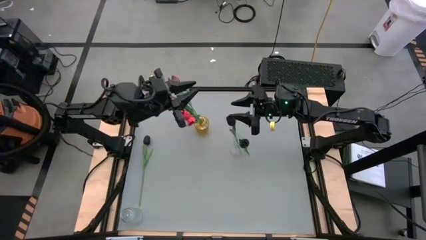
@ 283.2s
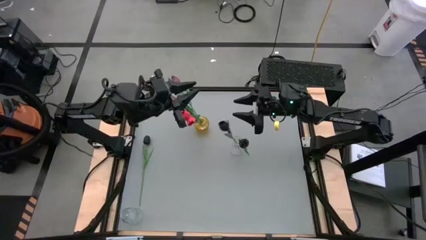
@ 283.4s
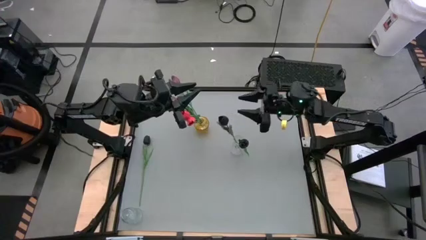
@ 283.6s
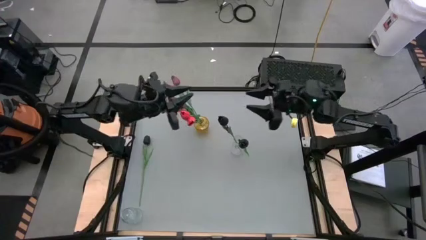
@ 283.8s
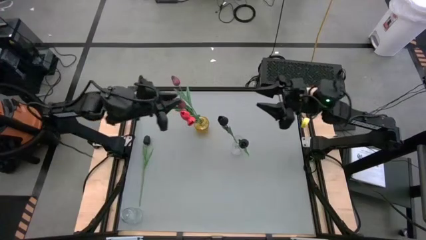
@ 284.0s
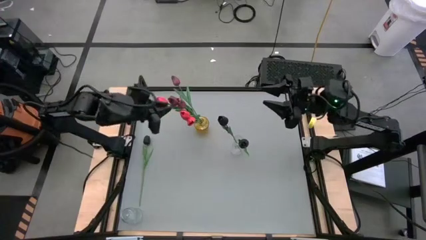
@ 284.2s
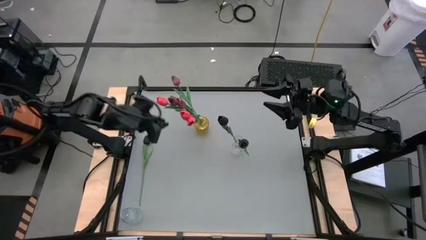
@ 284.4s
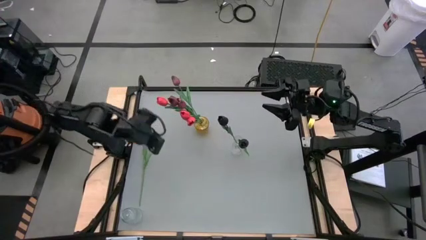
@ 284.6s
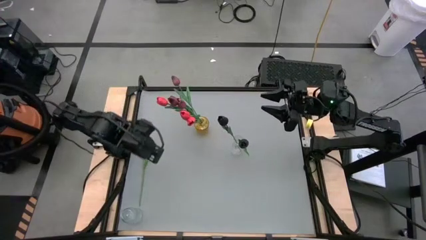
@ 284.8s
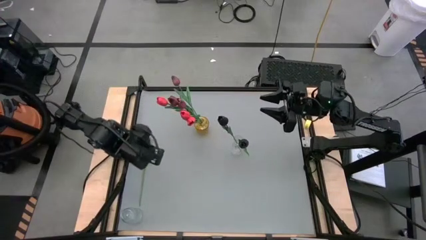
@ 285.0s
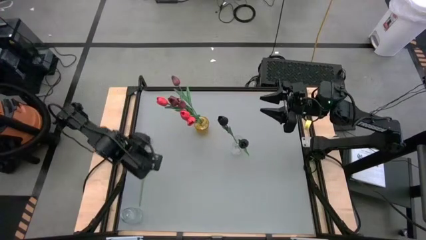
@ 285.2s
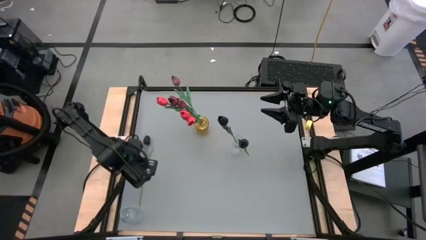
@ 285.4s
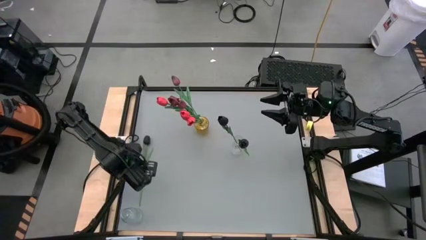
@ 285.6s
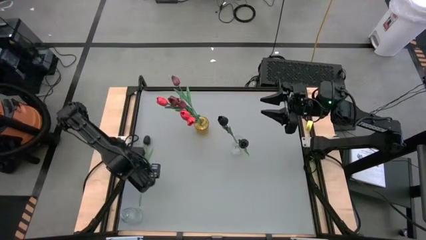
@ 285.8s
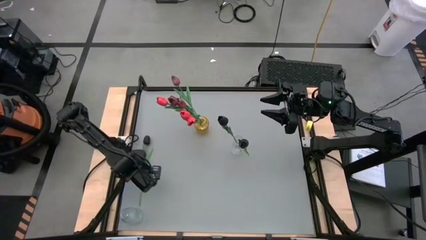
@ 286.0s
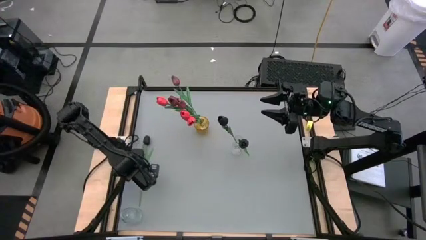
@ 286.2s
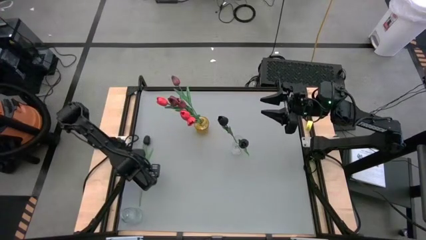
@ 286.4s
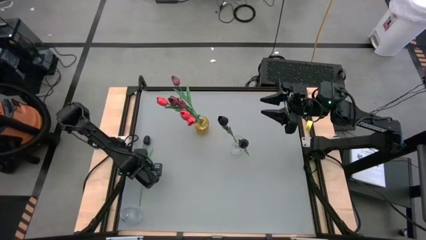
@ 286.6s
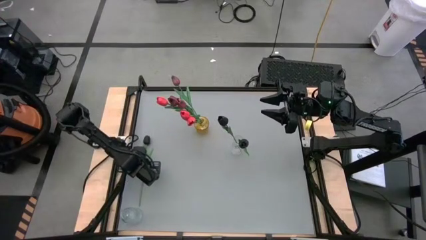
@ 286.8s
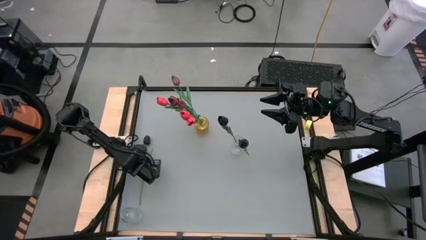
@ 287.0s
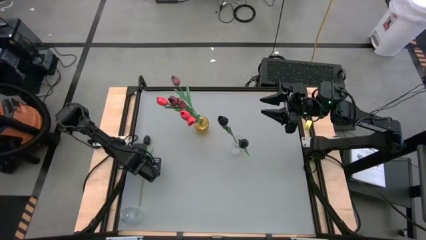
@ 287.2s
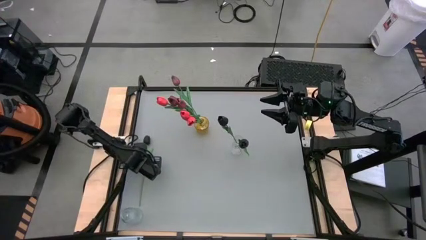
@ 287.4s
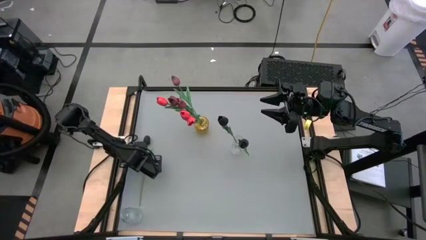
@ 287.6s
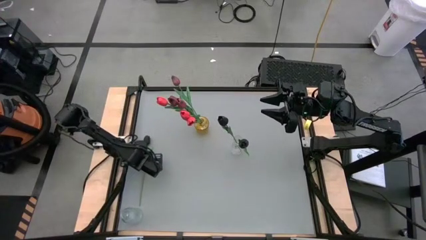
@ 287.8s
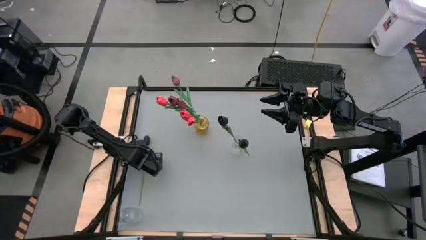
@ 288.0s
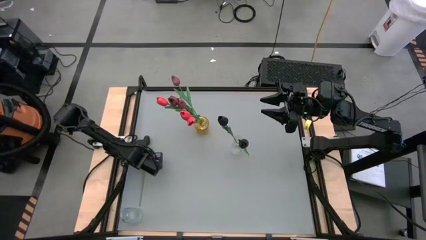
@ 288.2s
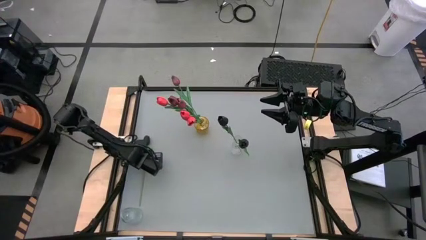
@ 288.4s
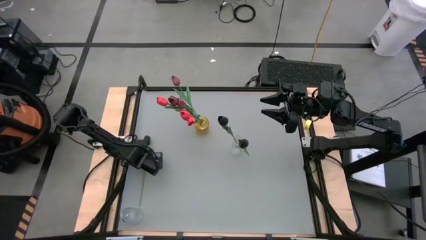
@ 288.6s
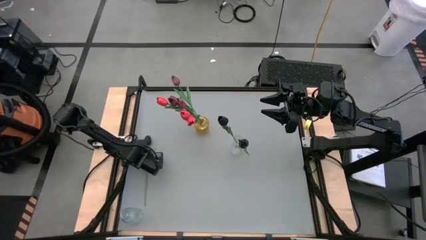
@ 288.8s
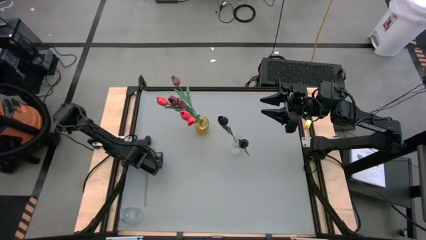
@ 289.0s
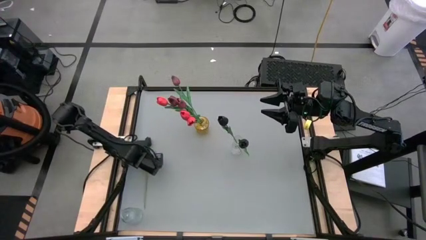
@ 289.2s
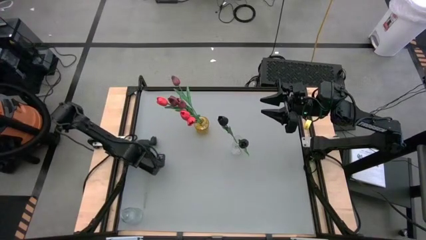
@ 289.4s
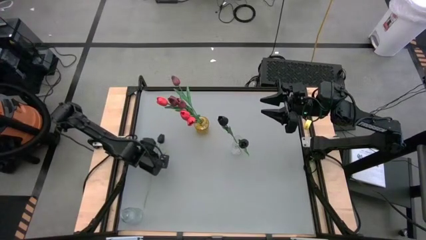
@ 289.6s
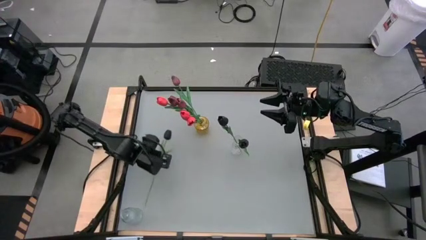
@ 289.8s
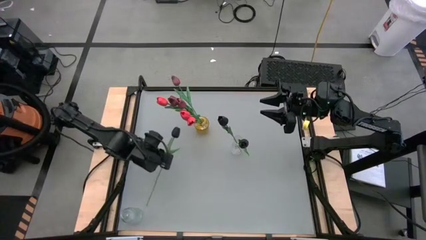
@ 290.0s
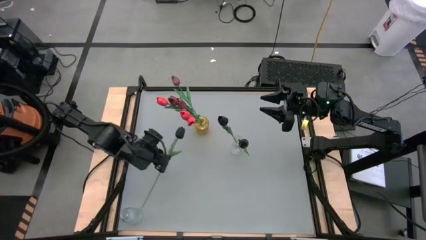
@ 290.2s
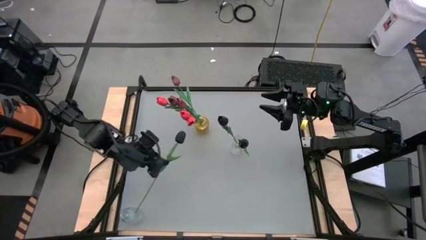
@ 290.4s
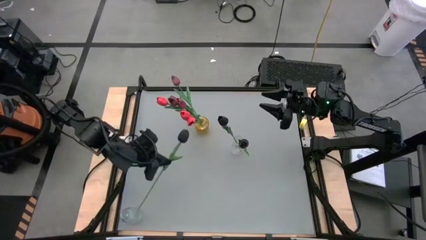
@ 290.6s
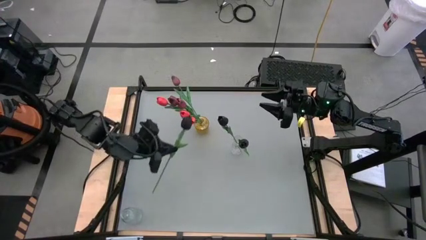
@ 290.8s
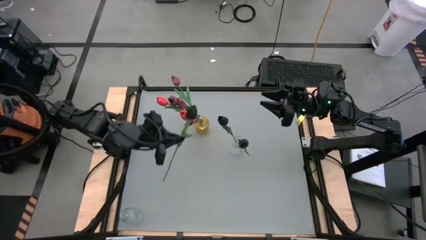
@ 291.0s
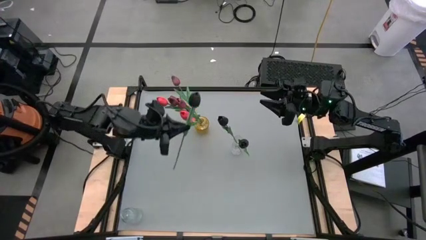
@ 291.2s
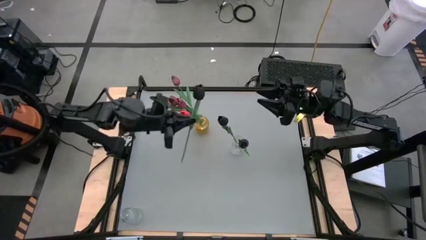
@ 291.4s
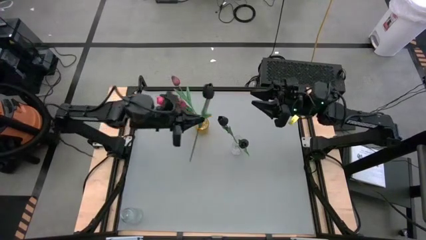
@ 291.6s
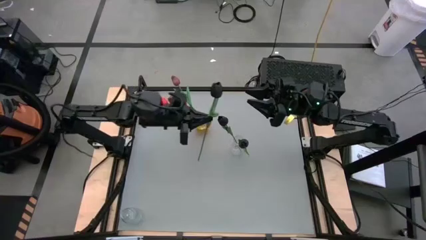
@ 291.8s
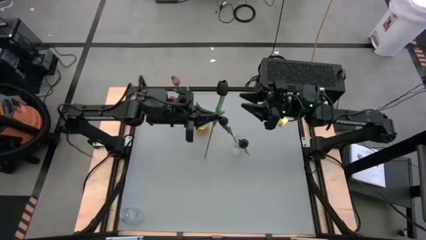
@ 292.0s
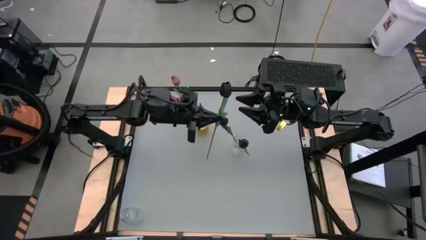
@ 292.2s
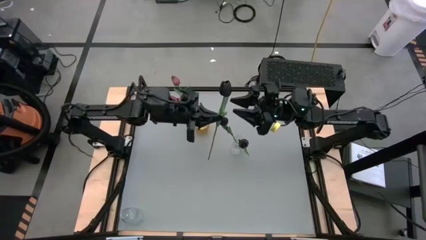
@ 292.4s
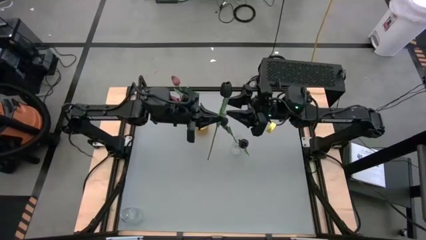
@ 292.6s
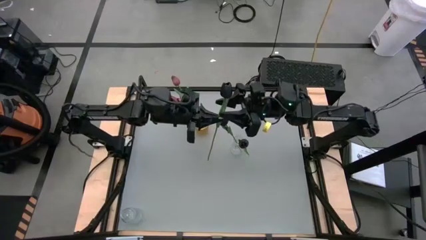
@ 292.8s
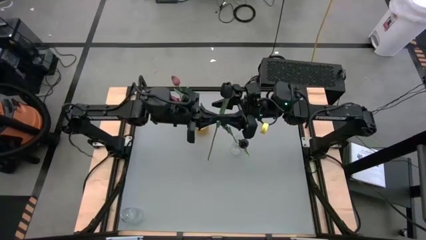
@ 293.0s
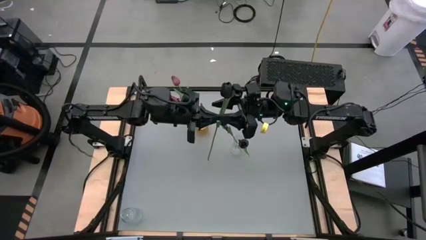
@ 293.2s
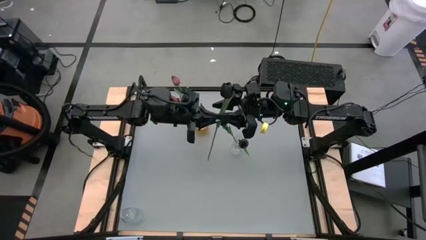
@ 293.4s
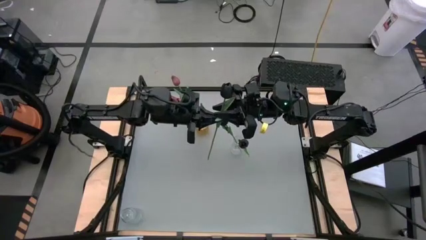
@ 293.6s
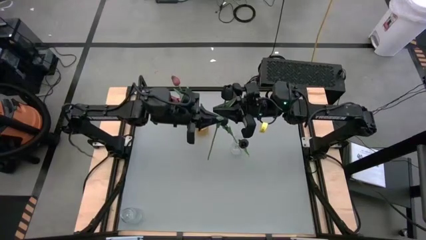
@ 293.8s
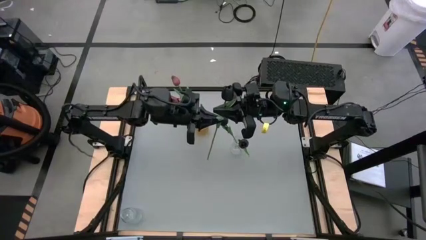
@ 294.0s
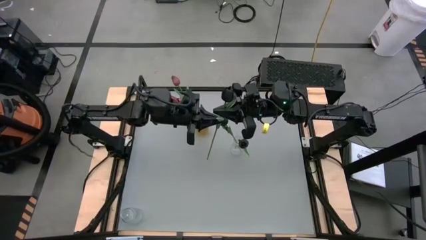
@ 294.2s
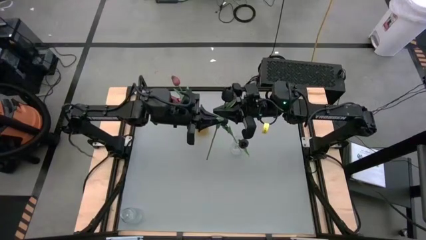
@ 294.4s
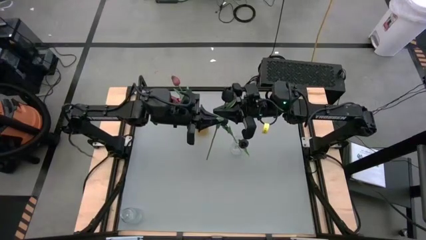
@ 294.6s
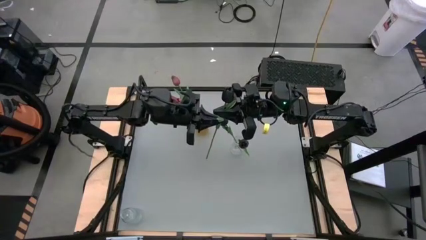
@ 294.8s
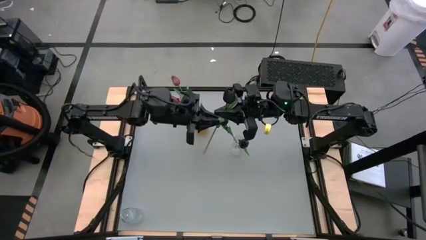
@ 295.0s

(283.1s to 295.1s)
Task: Sort flowers into vase by color
Put the black flower into the transparent vase
